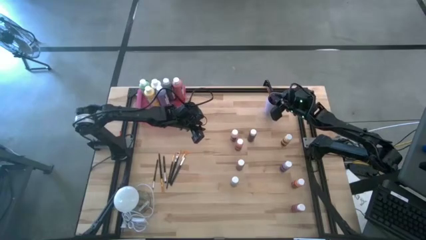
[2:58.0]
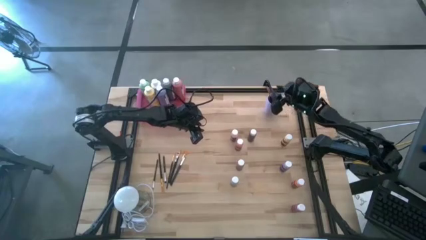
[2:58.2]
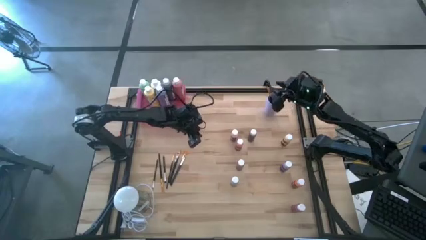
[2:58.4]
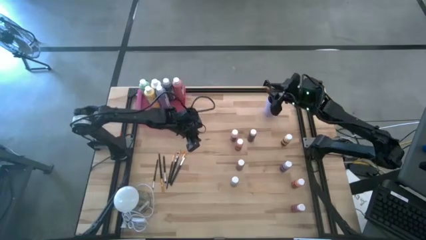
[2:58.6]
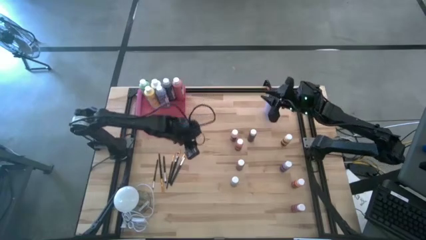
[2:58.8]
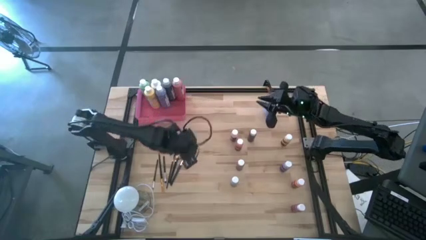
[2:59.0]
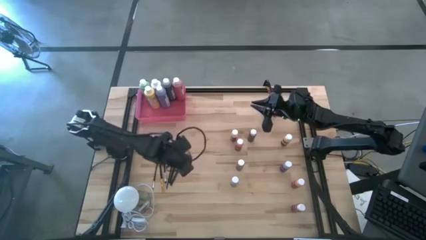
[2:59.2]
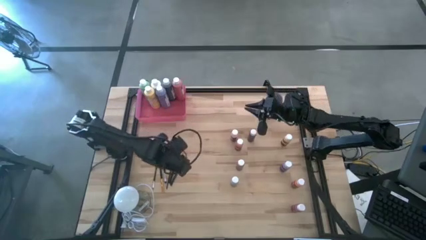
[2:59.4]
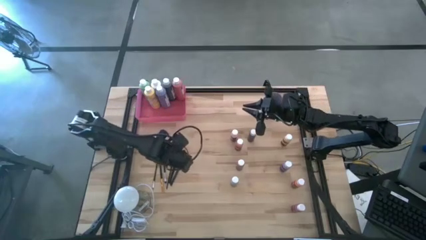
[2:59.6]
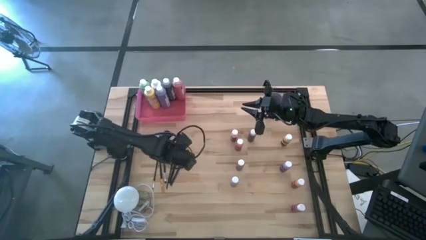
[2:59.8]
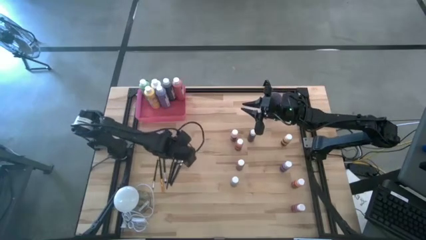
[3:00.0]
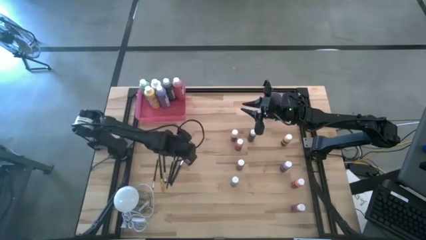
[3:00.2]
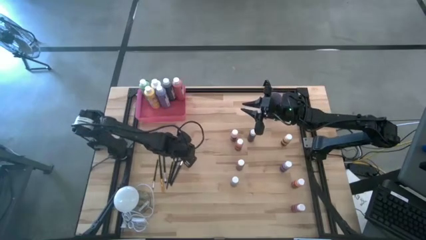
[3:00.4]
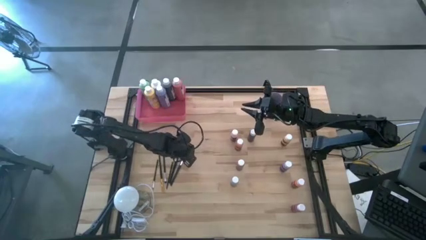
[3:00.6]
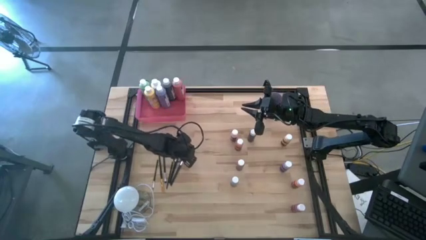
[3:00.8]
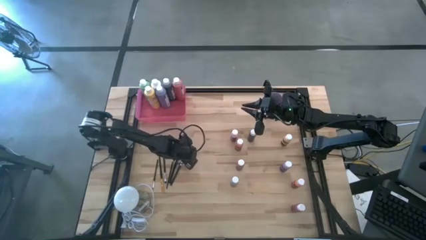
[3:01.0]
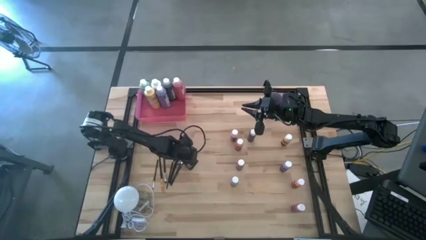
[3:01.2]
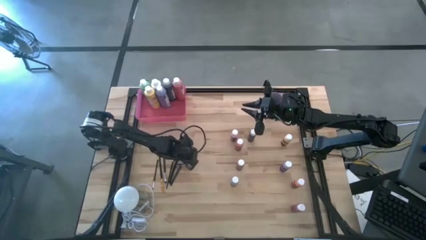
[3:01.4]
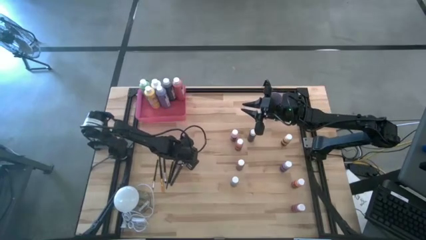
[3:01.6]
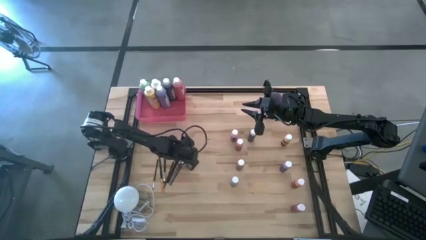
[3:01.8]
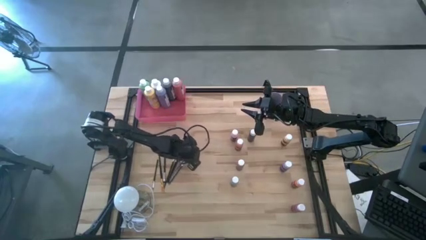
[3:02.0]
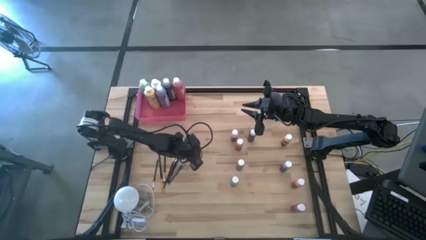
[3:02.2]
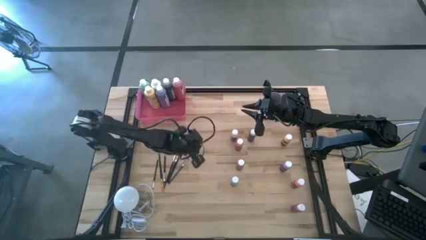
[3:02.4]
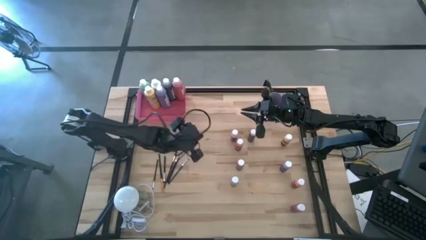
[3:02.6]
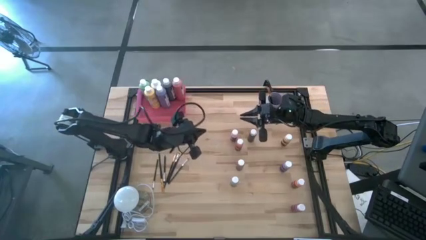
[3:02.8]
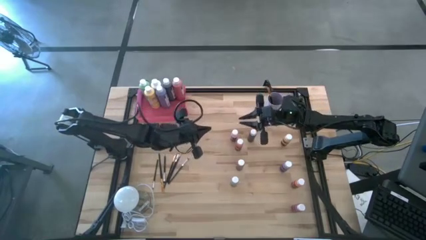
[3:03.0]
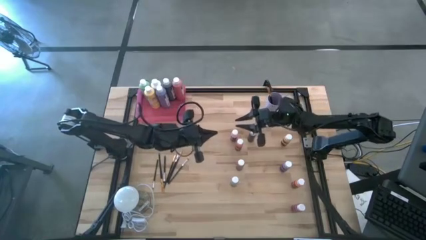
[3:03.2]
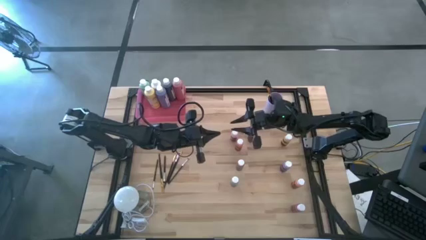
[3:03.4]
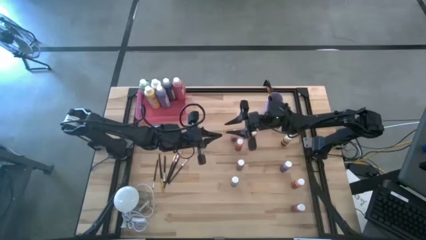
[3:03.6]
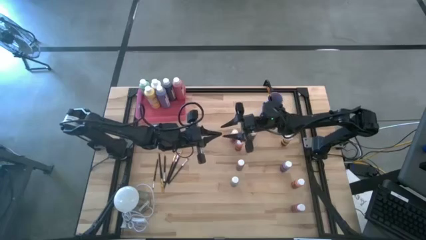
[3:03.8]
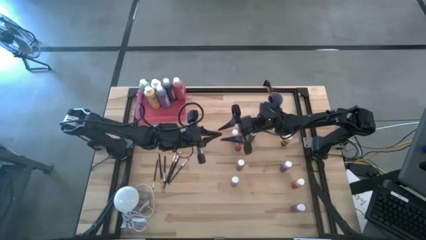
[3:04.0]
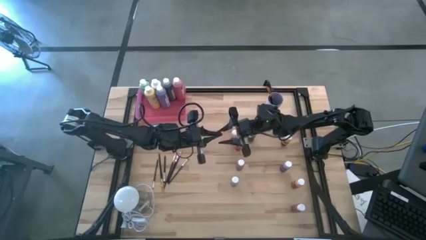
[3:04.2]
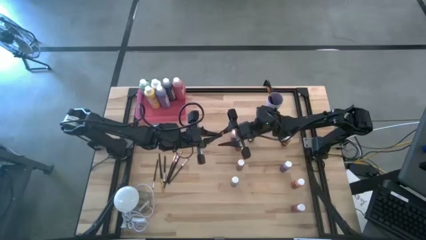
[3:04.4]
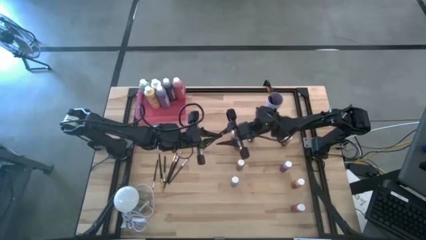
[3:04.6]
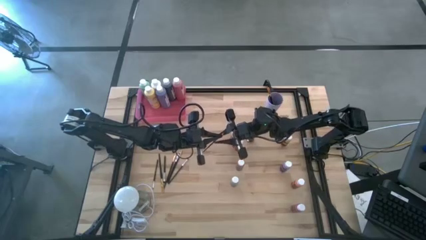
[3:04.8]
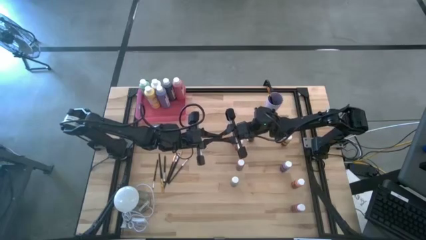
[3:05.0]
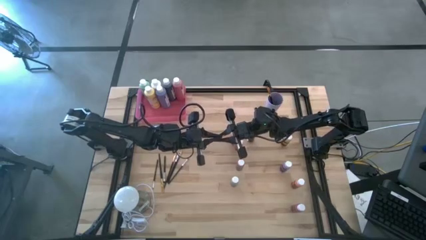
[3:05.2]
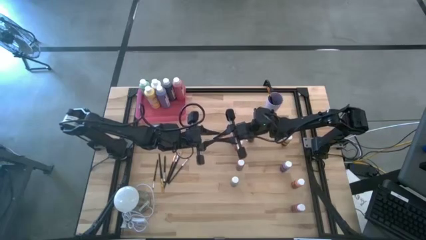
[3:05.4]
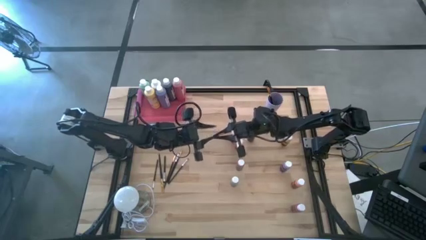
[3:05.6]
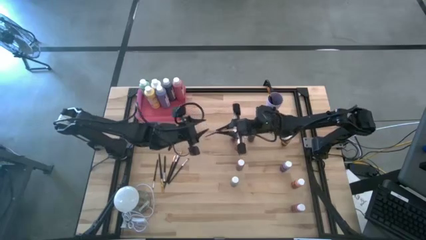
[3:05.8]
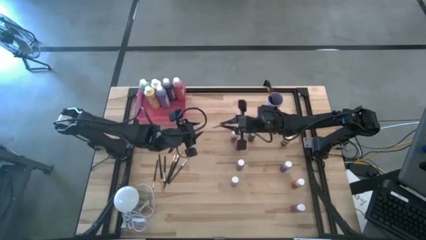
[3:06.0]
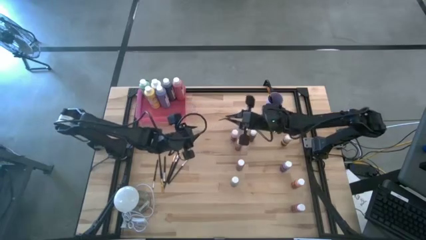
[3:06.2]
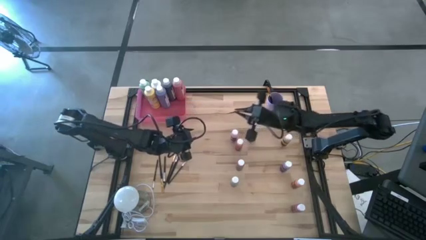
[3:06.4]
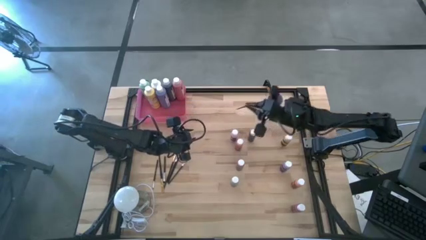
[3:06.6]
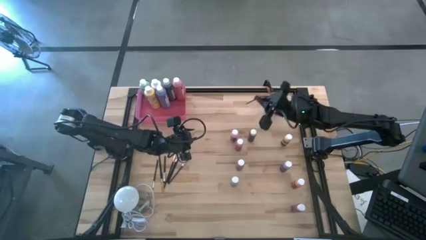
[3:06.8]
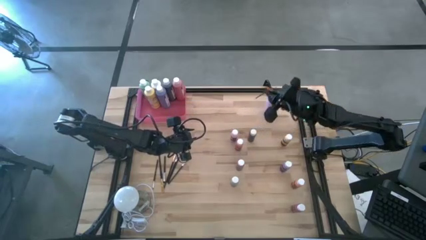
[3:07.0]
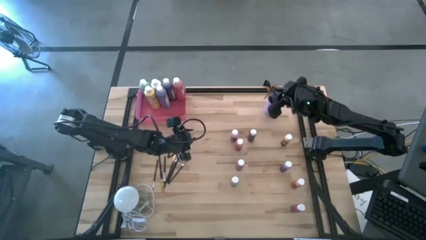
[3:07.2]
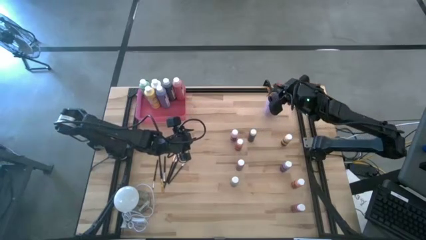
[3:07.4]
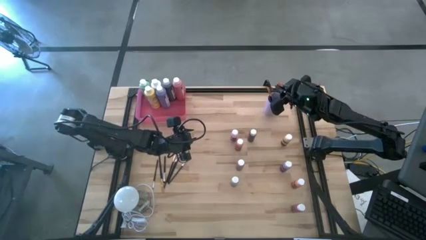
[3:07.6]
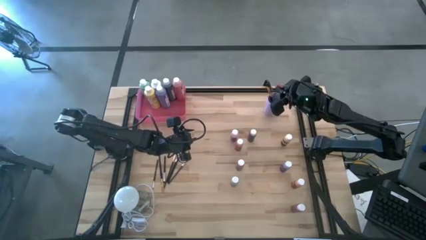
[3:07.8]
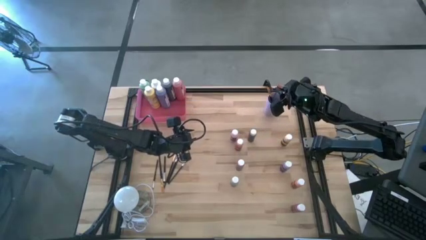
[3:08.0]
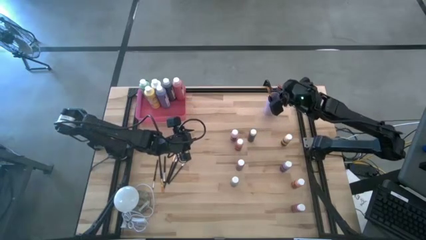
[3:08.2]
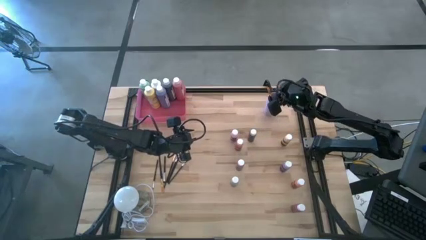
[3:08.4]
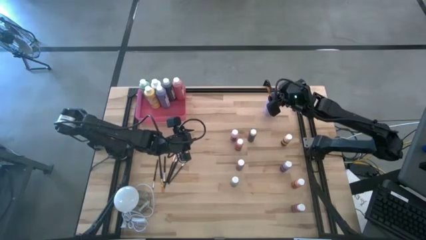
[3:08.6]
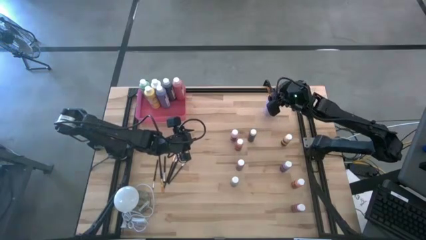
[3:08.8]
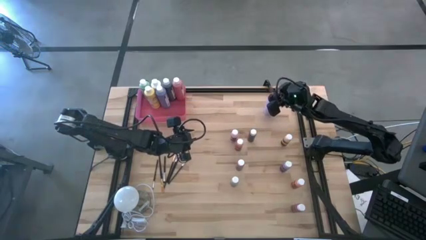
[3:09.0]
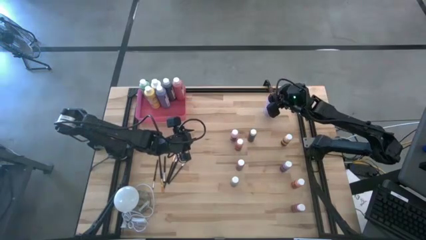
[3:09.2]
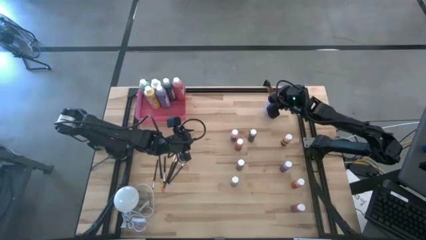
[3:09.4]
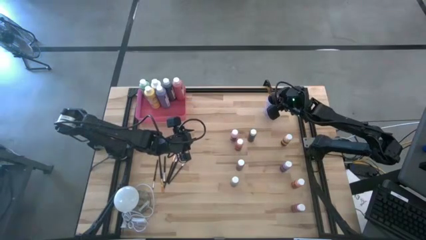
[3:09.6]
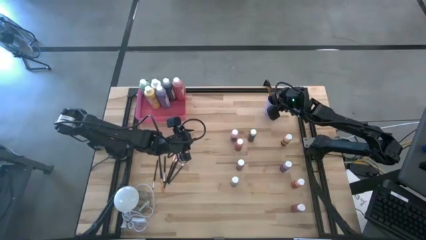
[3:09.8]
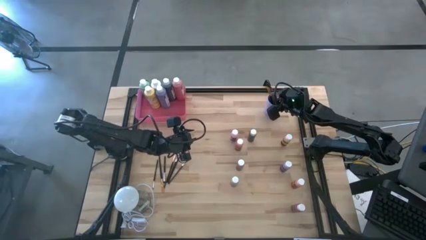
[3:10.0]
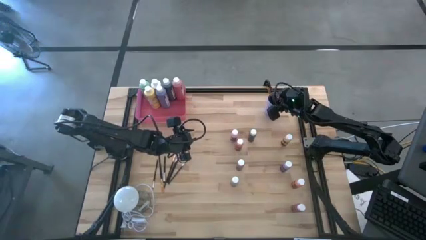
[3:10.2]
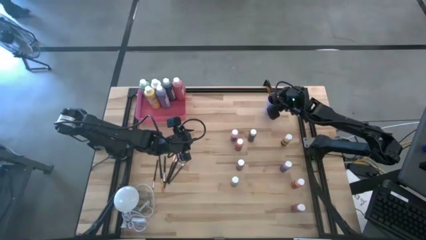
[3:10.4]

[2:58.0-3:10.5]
Task: Pick & Place Paint Supplies
Put the gold paint brush into the purple cup

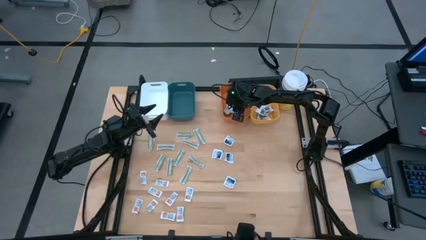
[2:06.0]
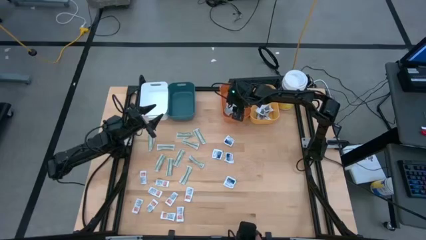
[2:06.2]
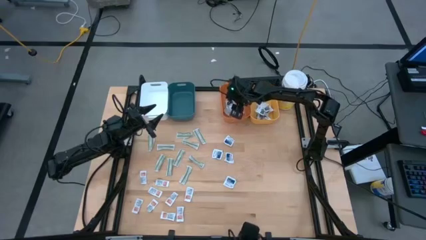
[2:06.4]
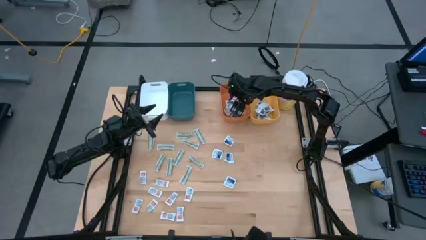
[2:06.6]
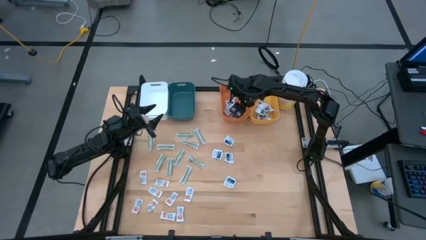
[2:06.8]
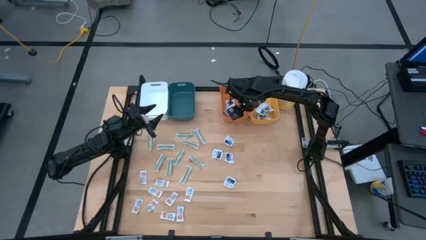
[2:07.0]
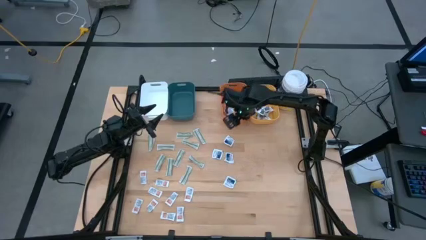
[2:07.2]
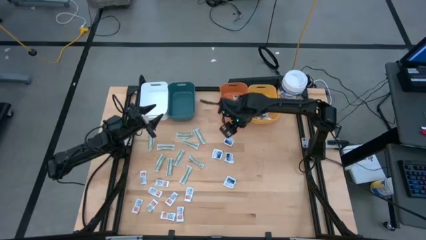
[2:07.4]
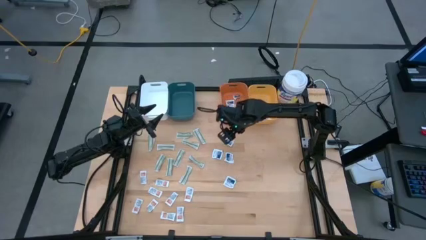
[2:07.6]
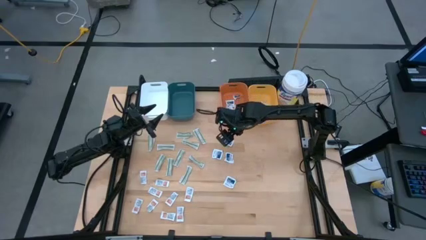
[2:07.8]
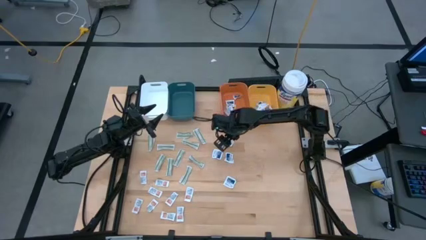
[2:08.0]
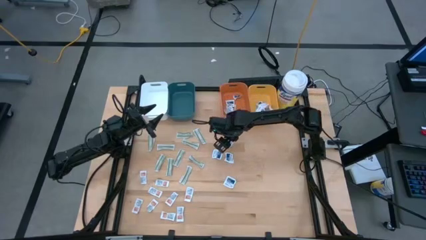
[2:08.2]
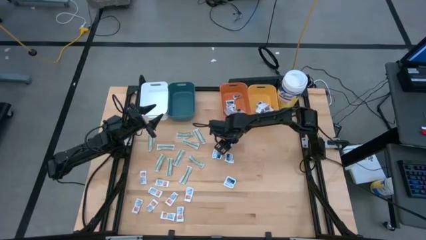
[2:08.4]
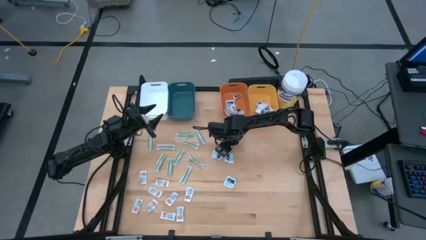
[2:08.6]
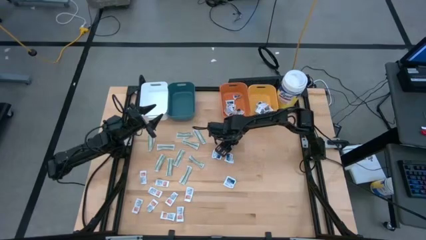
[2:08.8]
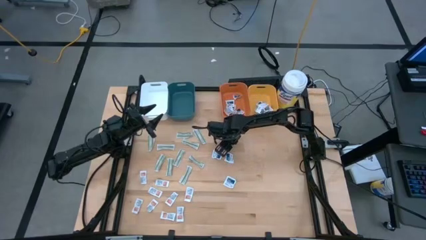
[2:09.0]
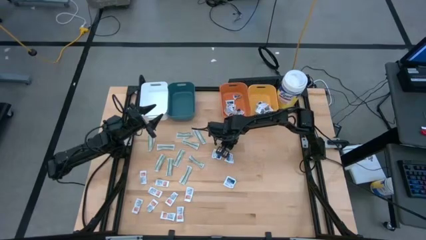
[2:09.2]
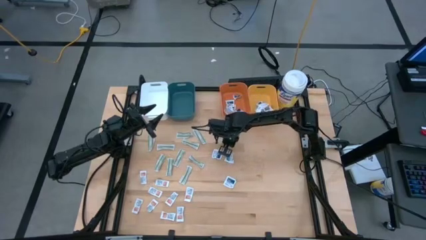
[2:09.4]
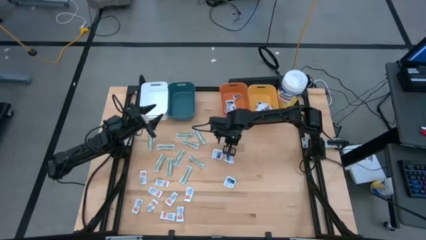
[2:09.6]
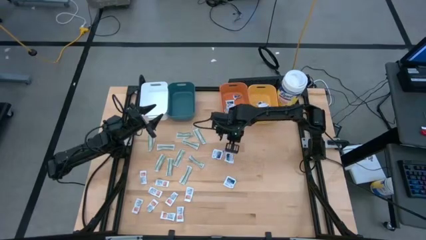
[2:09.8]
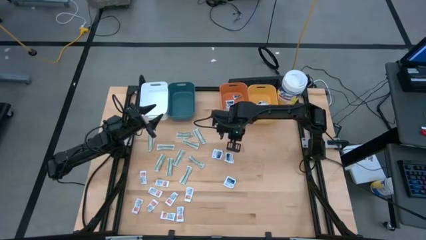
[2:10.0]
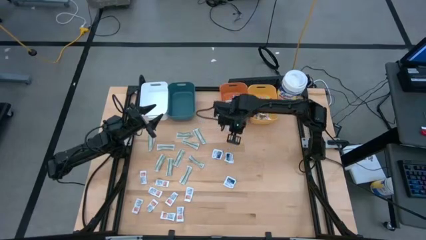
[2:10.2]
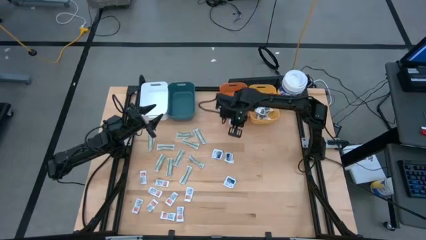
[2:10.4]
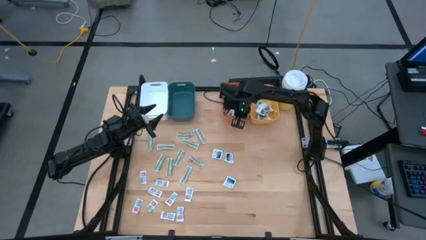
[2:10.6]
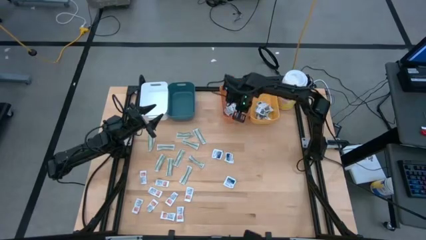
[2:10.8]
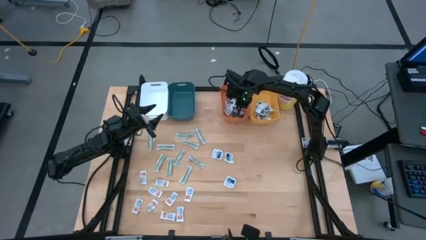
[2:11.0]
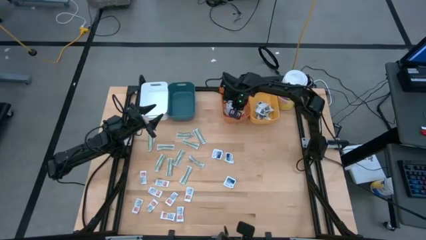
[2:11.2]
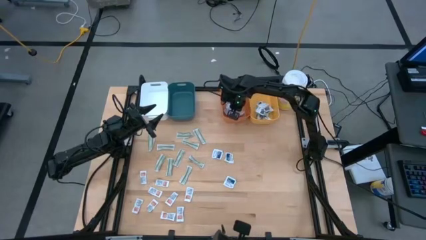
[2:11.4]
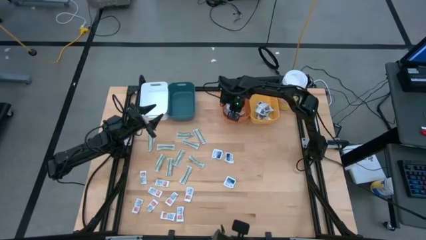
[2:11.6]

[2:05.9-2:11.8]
Task: Pick & Place First Aid Supplies
Put the alcohol pad into the orange bin
